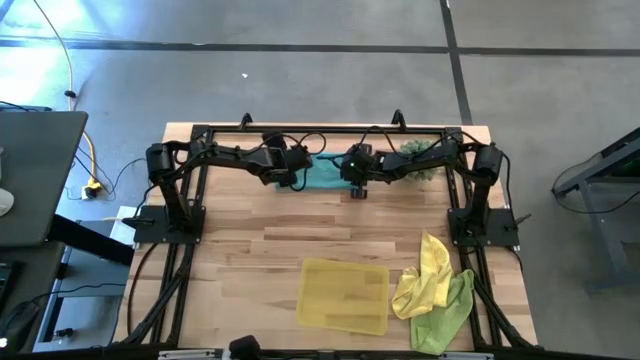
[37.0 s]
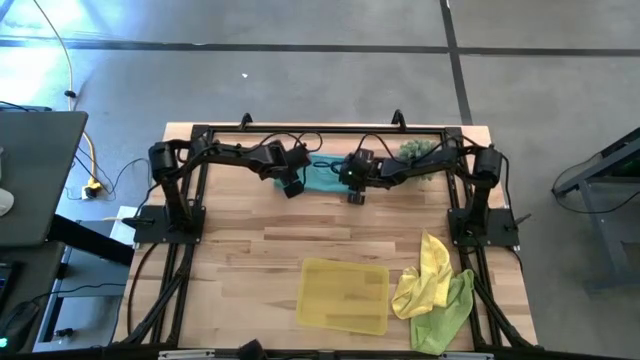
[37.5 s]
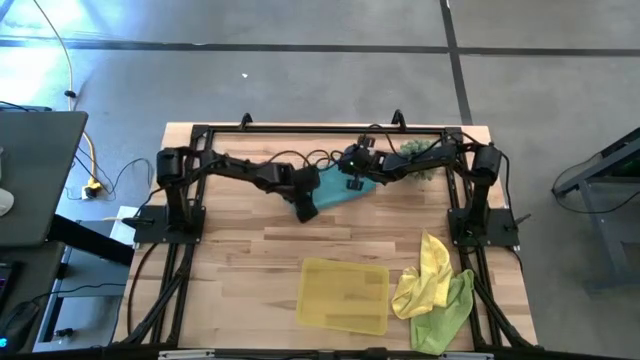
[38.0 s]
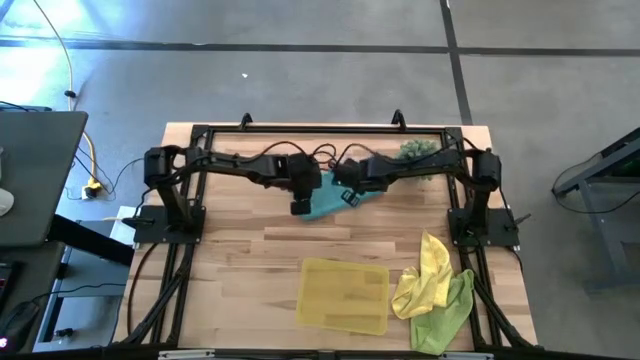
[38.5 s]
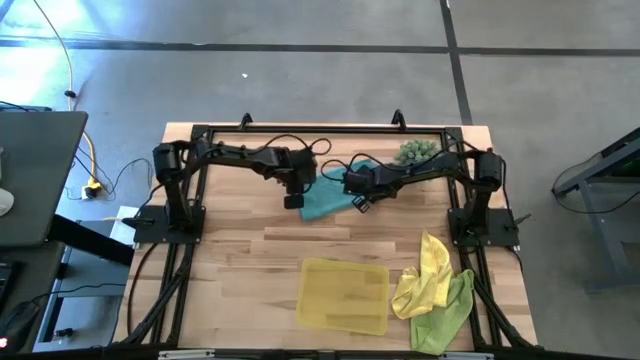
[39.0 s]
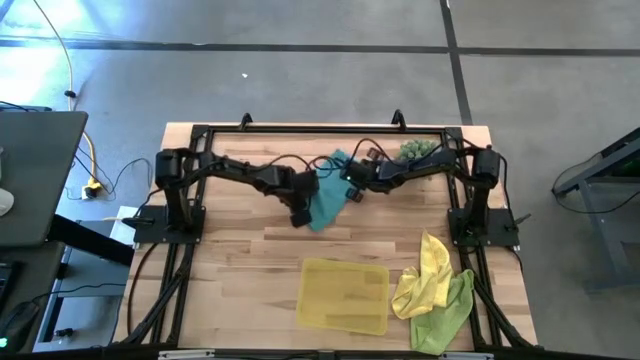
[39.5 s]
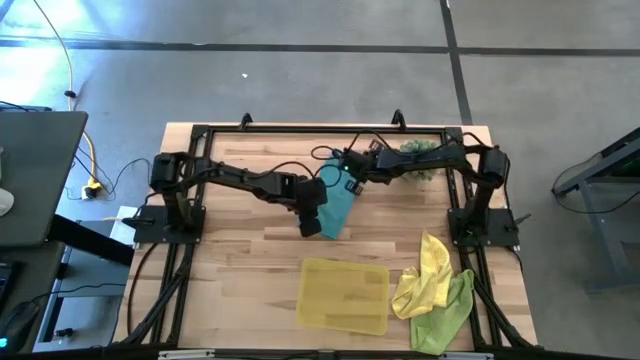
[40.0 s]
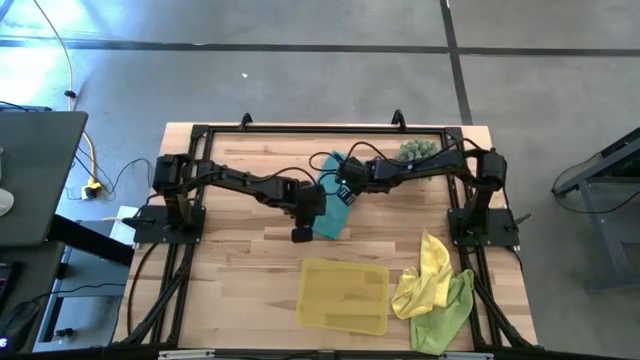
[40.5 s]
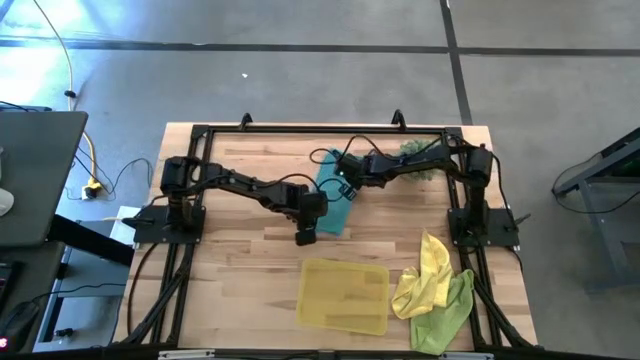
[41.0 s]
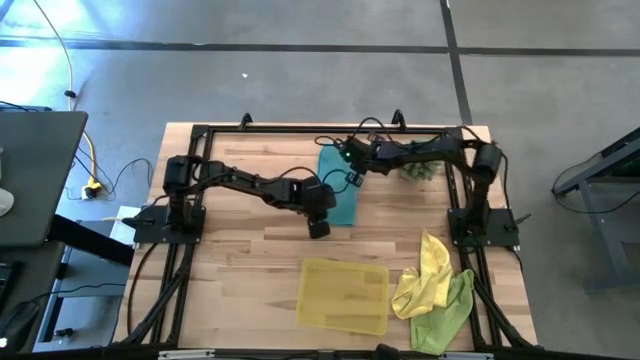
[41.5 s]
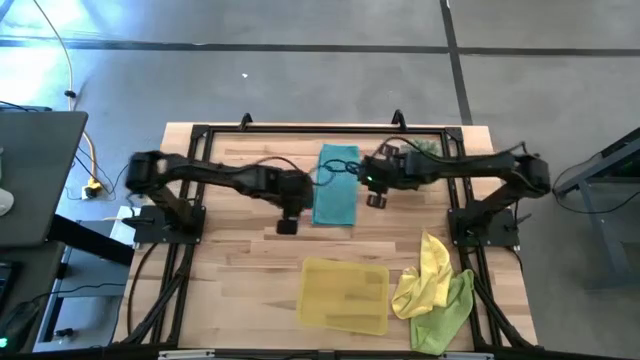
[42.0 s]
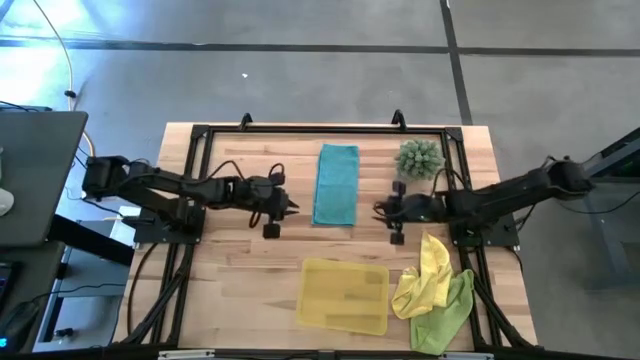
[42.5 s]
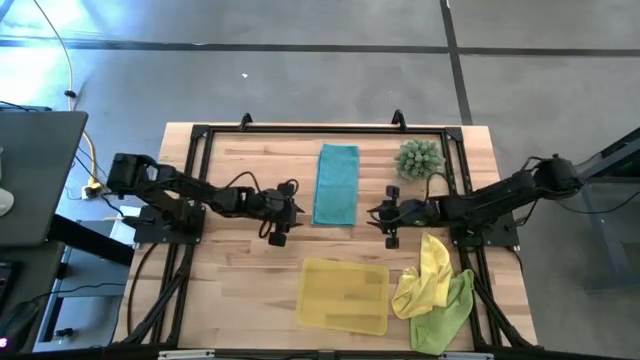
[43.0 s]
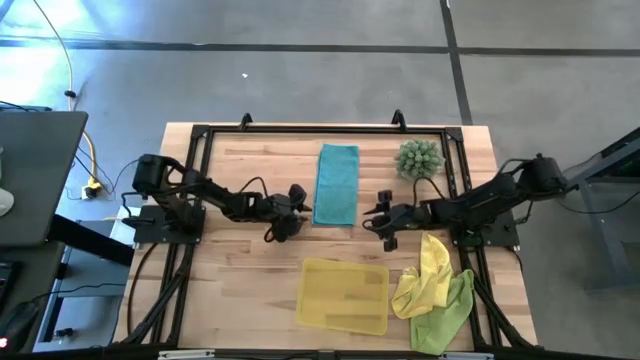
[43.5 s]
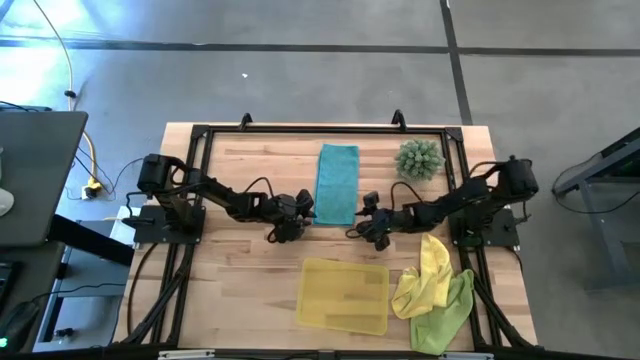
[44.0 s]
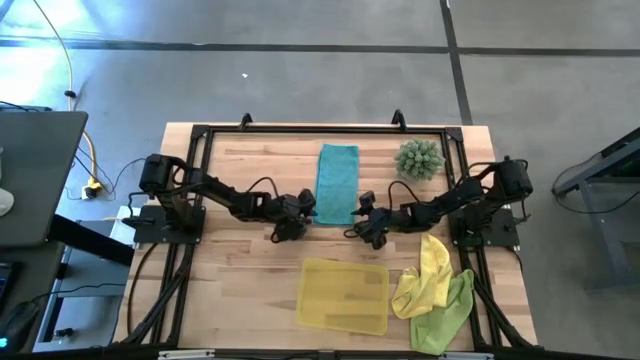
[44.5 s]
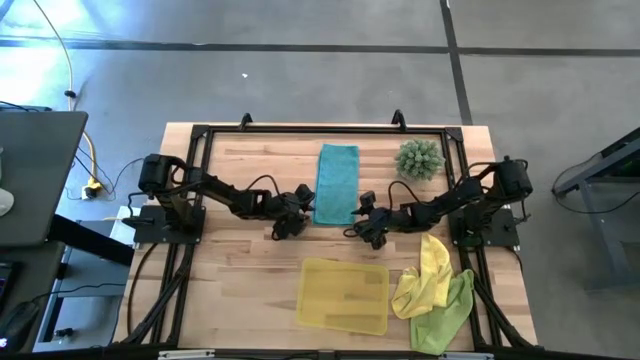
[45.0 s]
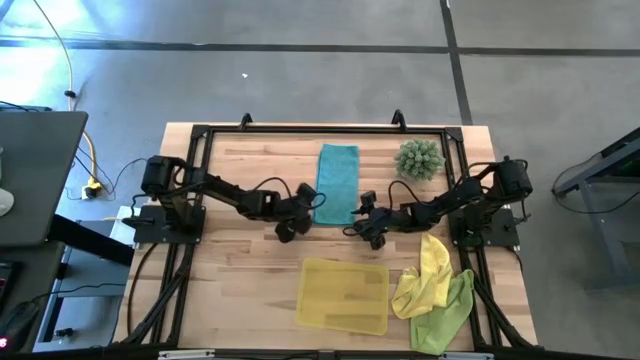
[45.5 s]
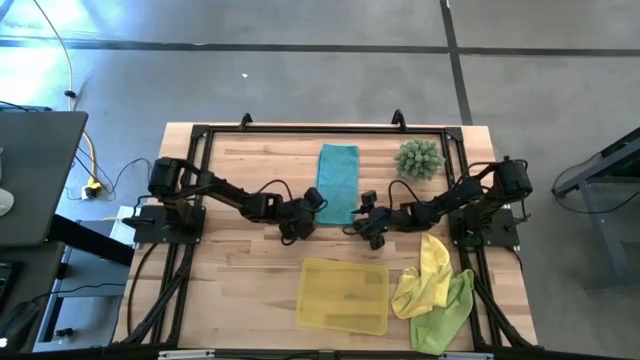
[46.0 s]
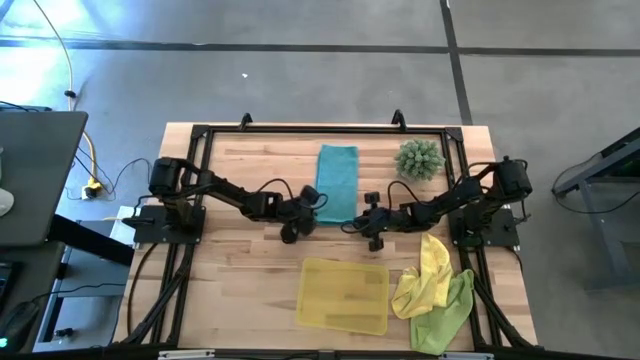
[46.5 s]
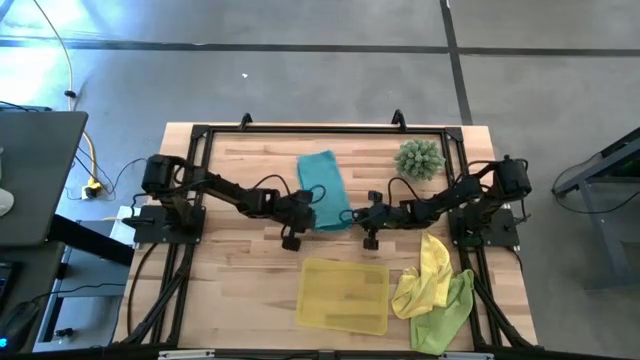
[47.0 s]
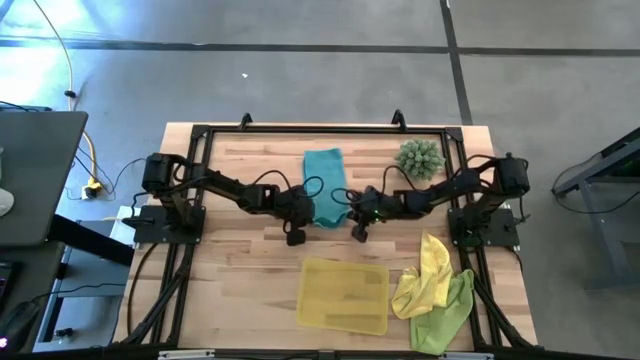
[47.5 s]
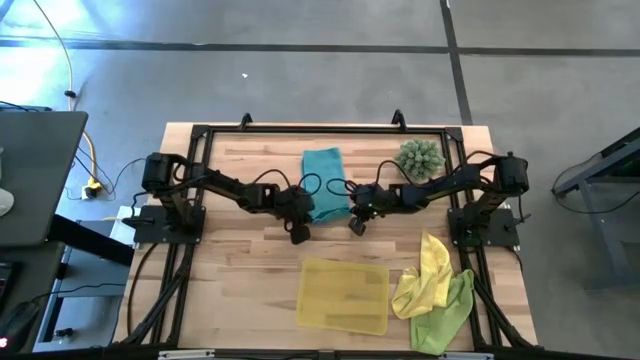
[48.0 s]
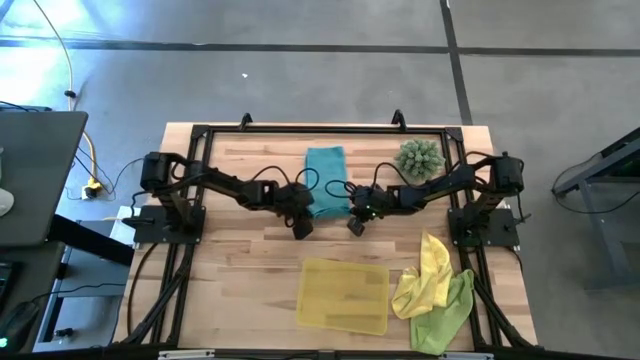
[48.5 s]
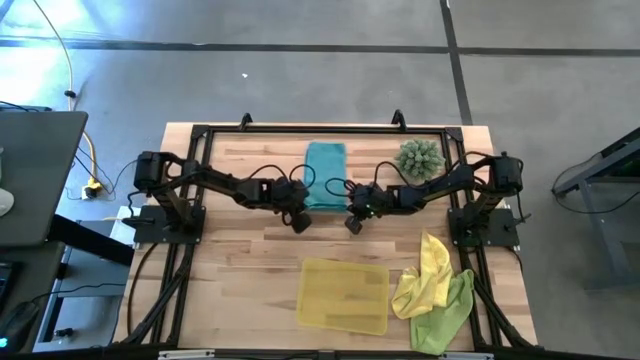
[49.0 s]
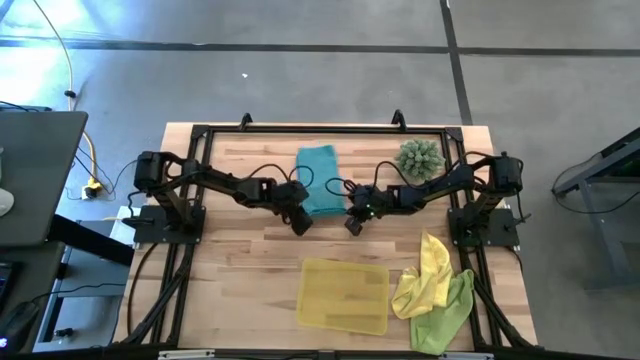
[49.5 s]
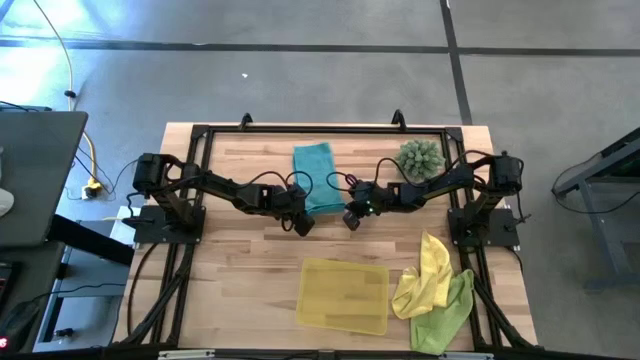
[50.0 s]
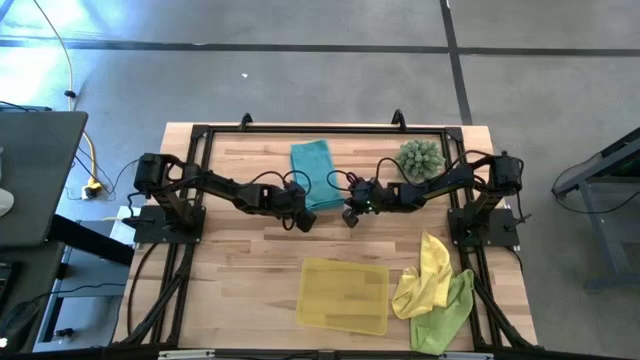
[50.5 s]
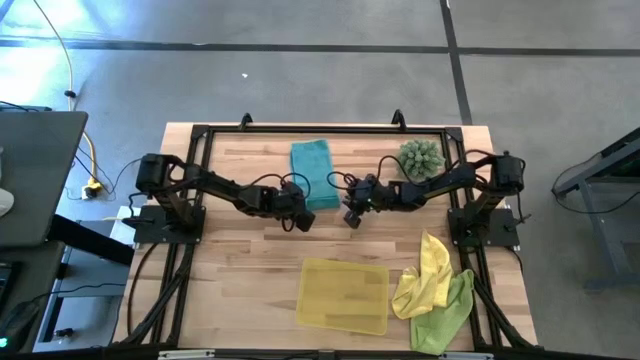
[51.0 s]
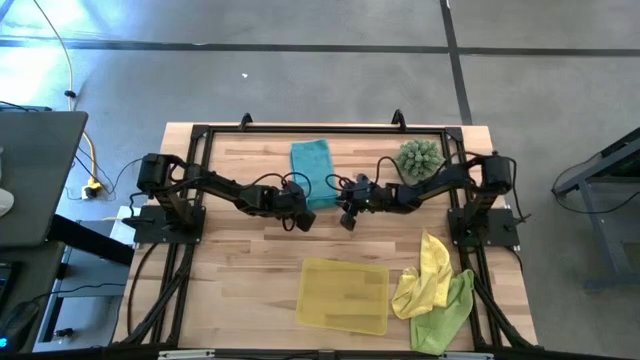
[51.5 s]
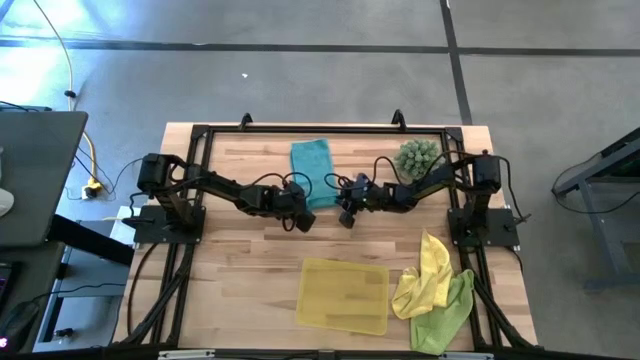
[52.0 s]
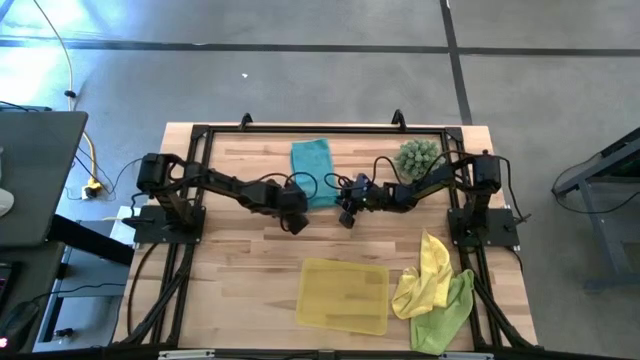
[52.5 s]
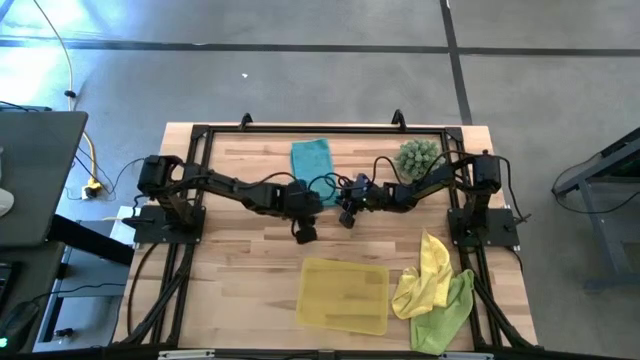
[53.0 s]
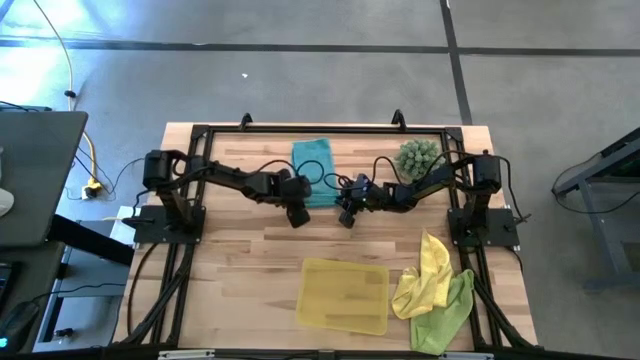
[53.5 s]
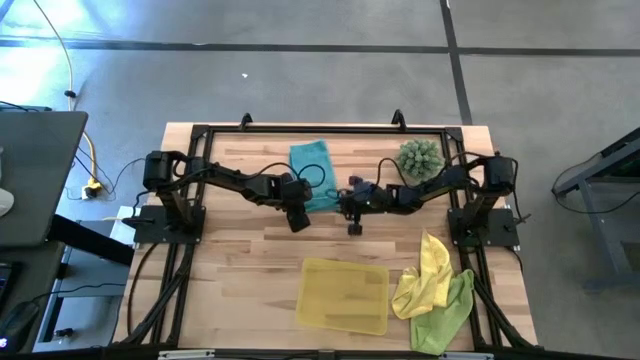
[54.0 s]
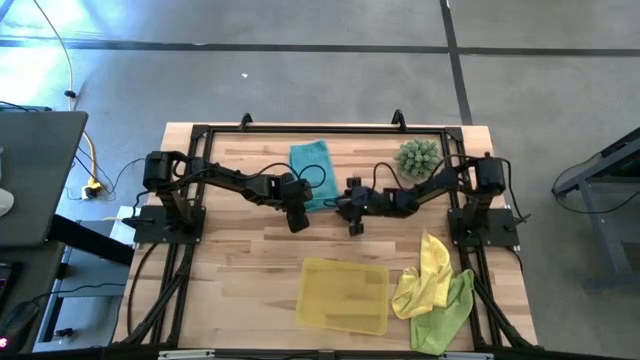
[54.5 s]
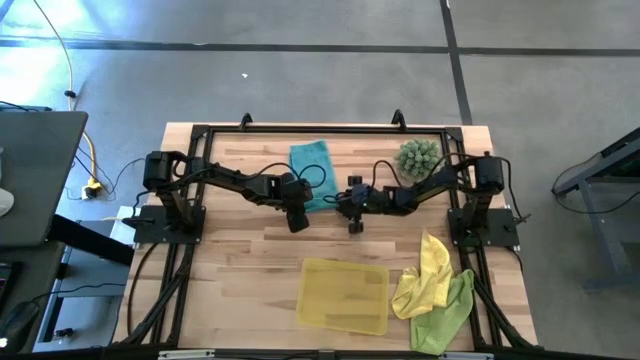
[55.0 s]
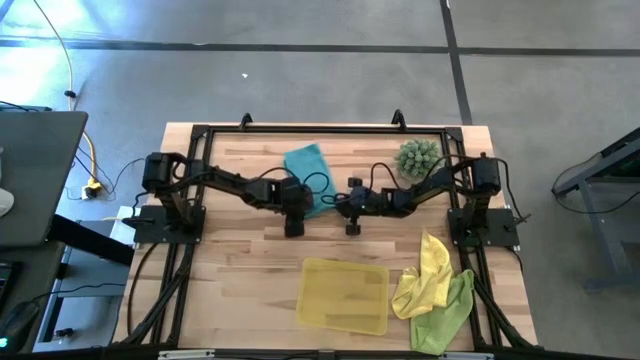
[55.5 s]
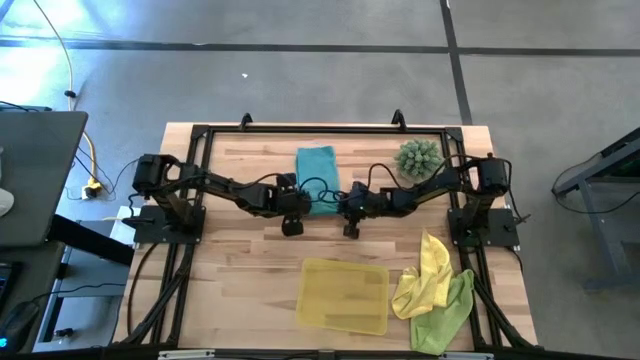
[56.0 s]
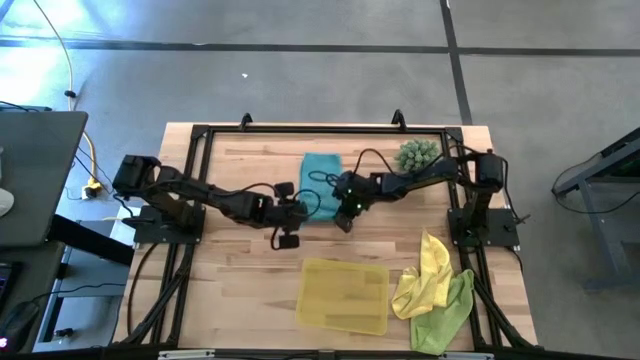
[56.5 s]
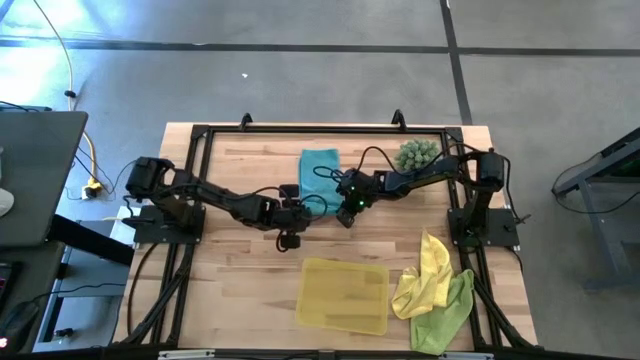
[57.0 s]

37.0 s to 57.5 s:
Task: Roll microfiber towels into tight, uniform cylinder then place into a basket
Roll the blue towel
